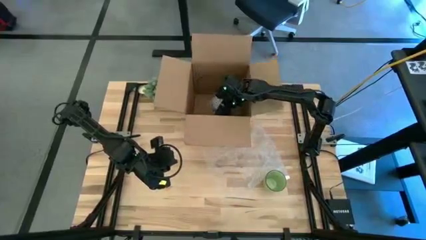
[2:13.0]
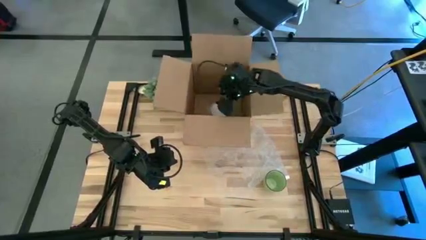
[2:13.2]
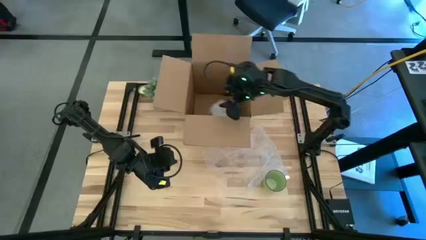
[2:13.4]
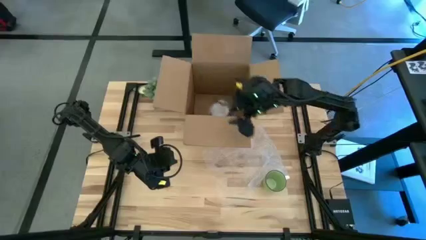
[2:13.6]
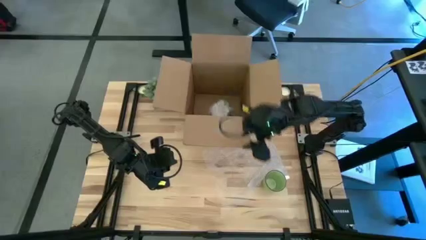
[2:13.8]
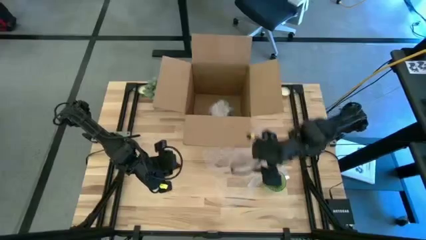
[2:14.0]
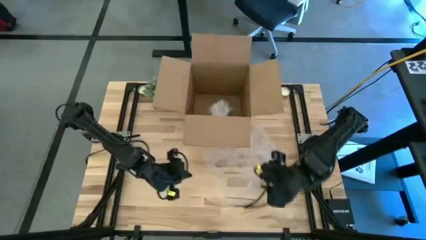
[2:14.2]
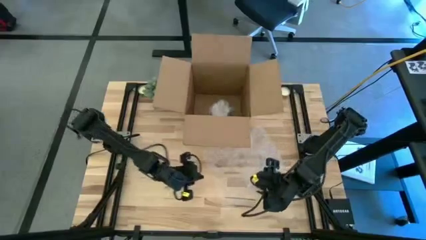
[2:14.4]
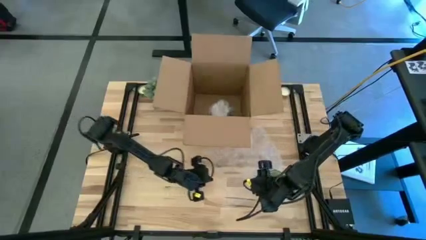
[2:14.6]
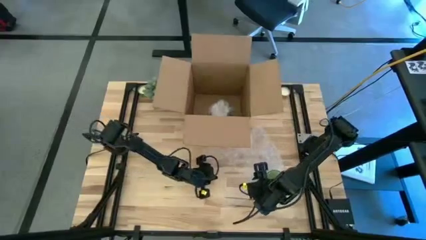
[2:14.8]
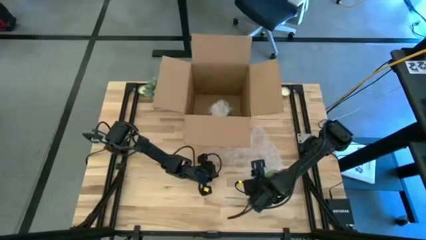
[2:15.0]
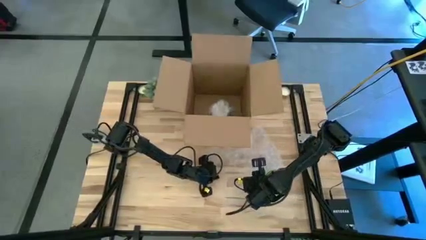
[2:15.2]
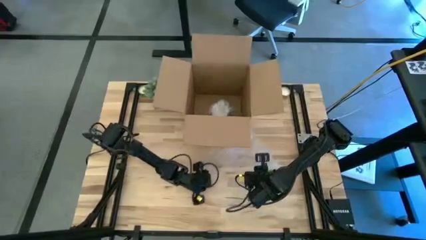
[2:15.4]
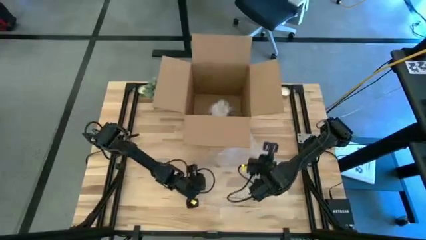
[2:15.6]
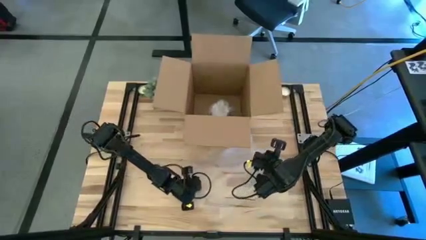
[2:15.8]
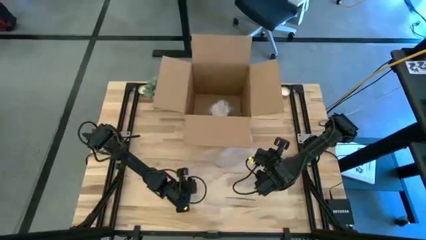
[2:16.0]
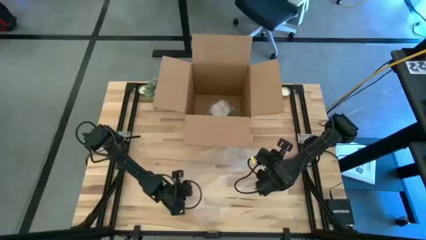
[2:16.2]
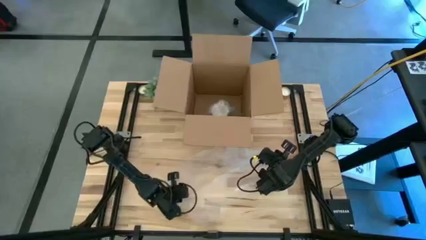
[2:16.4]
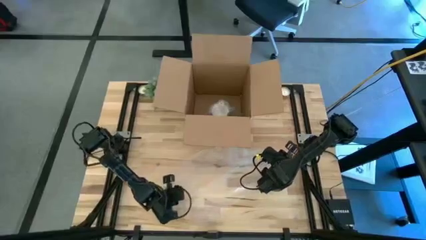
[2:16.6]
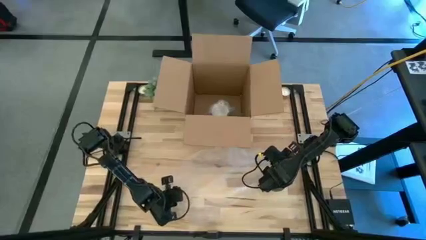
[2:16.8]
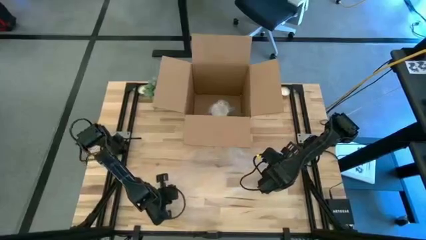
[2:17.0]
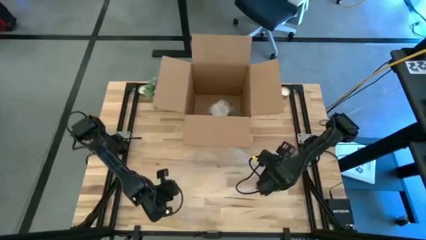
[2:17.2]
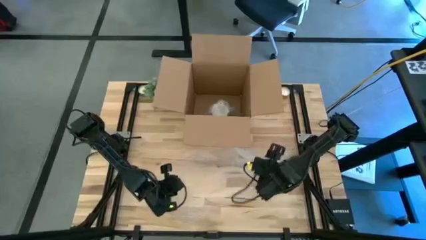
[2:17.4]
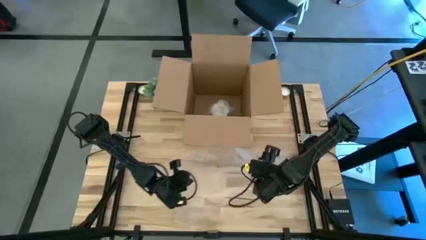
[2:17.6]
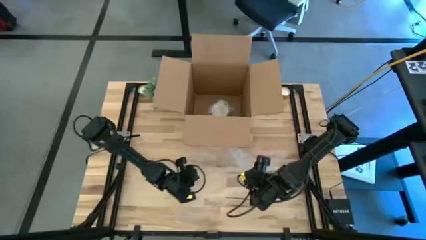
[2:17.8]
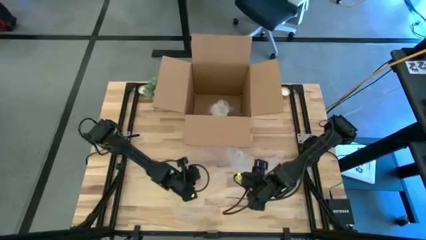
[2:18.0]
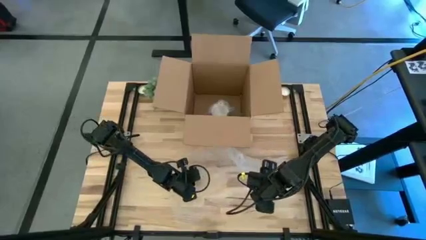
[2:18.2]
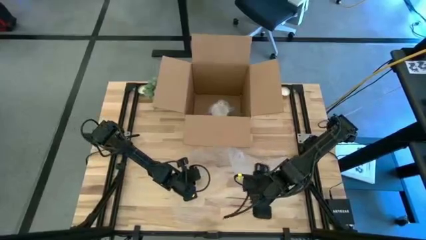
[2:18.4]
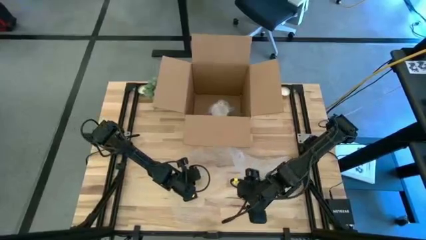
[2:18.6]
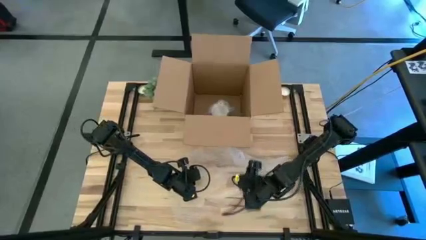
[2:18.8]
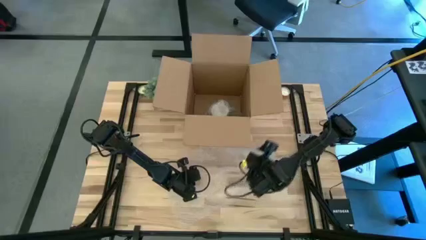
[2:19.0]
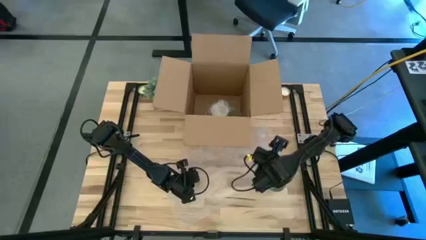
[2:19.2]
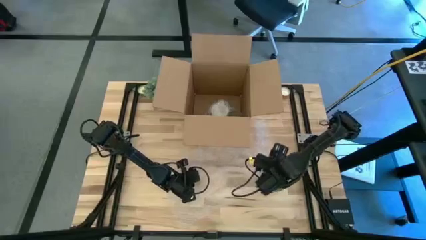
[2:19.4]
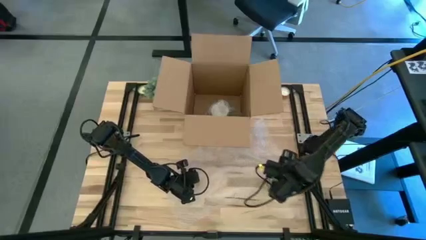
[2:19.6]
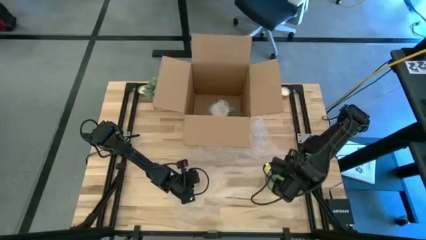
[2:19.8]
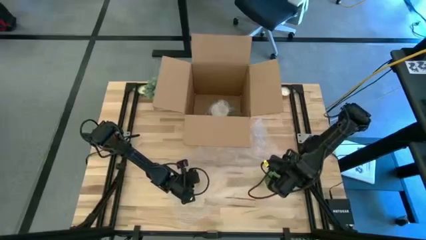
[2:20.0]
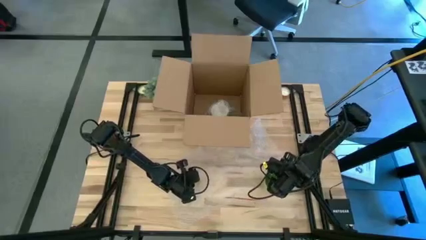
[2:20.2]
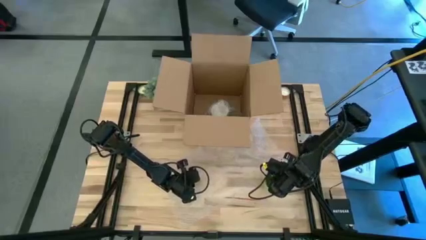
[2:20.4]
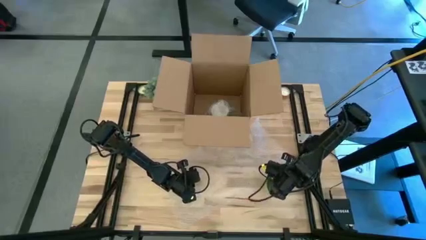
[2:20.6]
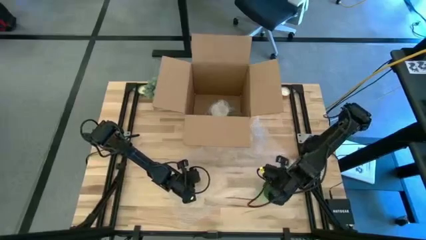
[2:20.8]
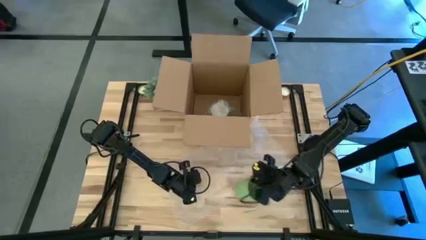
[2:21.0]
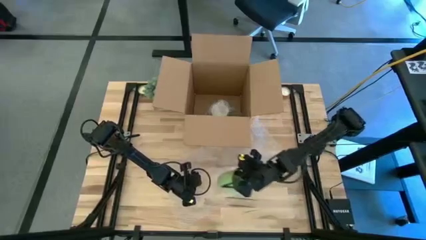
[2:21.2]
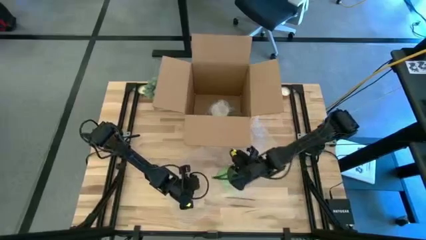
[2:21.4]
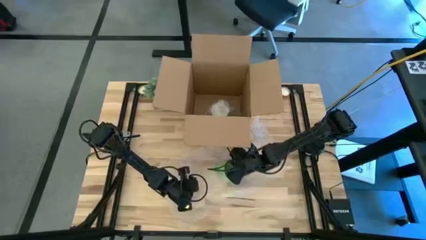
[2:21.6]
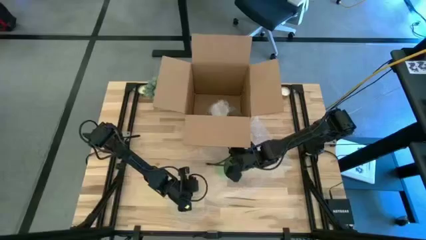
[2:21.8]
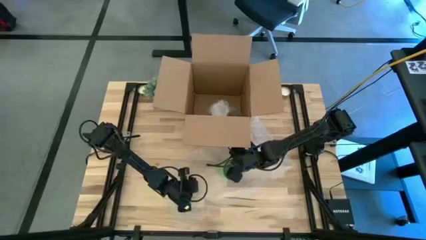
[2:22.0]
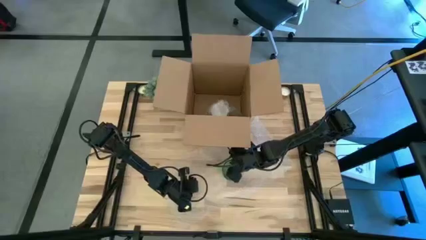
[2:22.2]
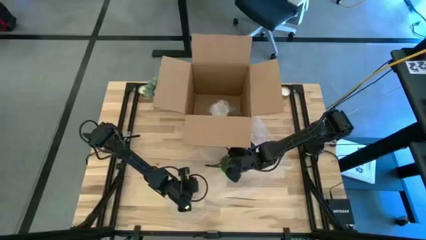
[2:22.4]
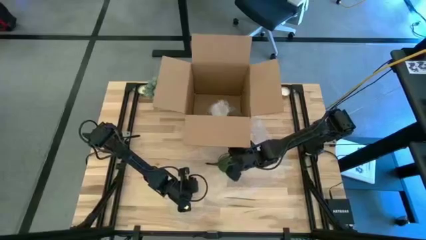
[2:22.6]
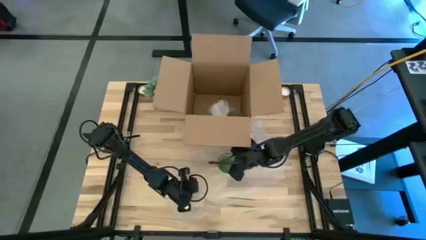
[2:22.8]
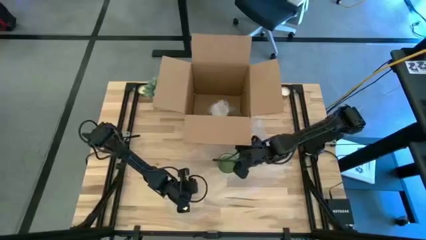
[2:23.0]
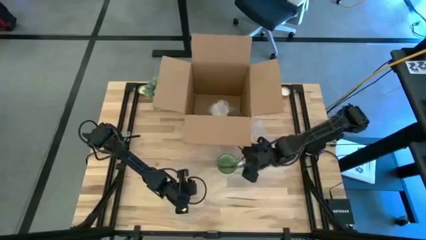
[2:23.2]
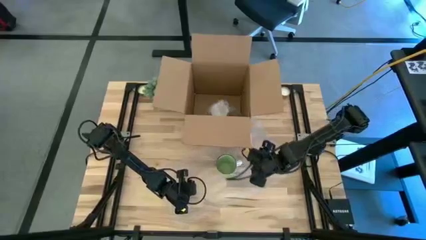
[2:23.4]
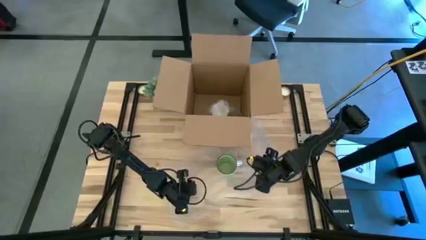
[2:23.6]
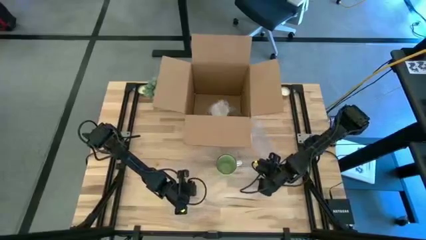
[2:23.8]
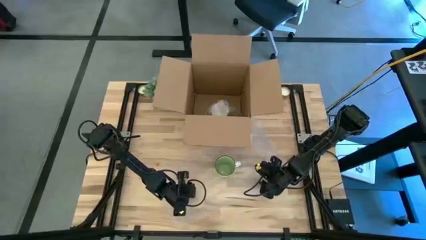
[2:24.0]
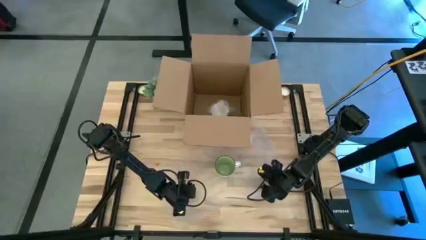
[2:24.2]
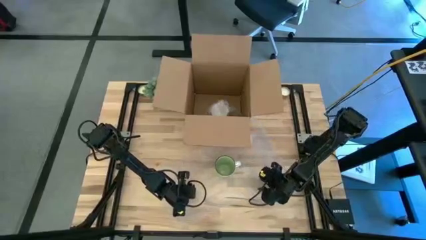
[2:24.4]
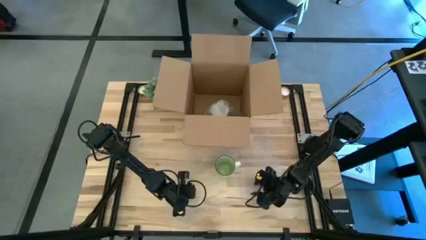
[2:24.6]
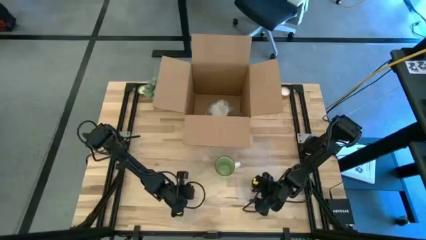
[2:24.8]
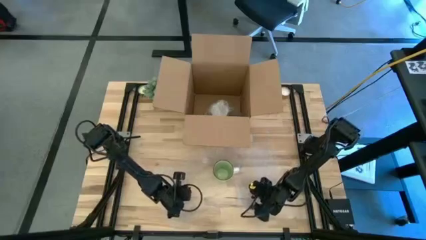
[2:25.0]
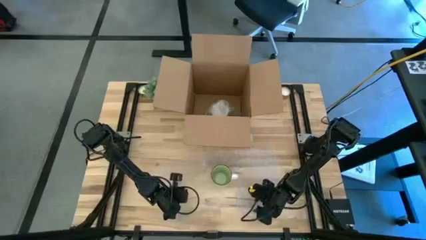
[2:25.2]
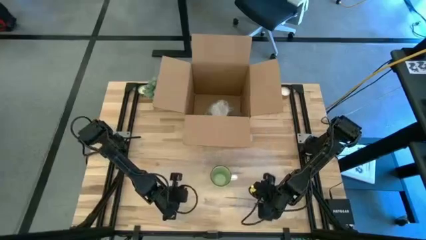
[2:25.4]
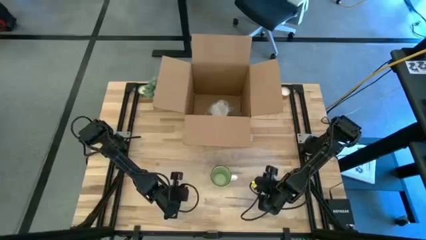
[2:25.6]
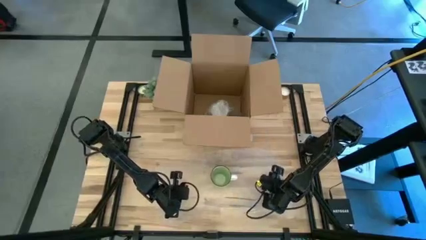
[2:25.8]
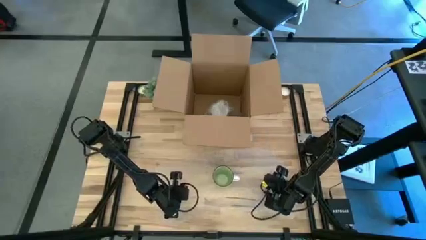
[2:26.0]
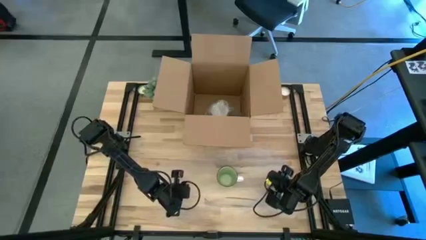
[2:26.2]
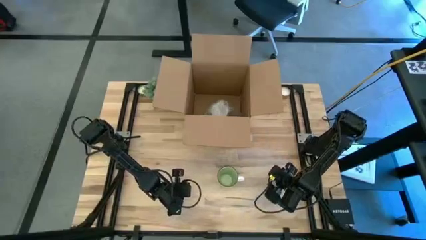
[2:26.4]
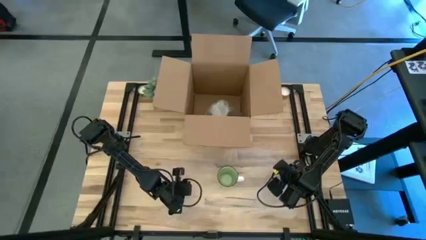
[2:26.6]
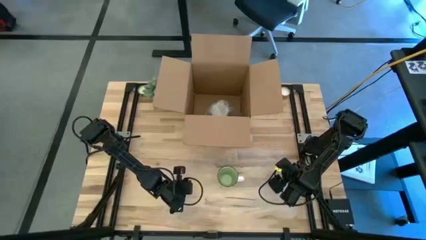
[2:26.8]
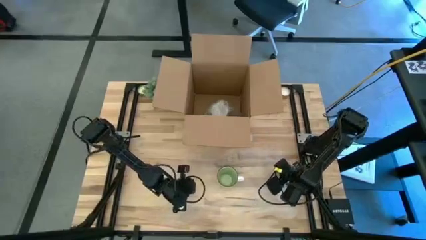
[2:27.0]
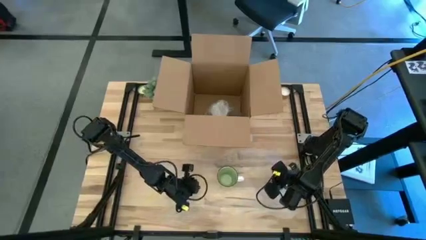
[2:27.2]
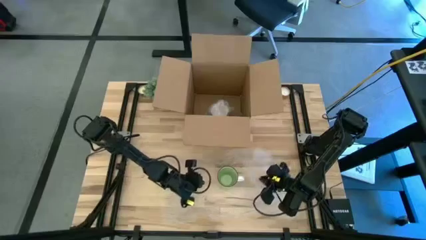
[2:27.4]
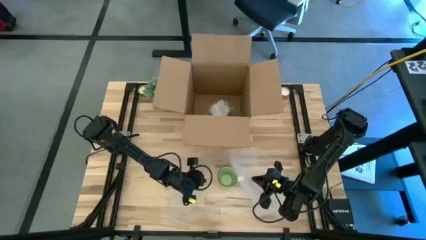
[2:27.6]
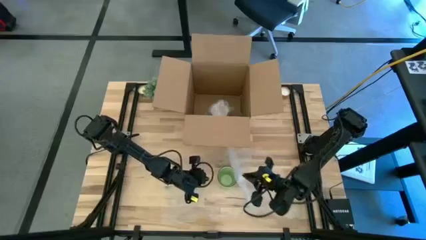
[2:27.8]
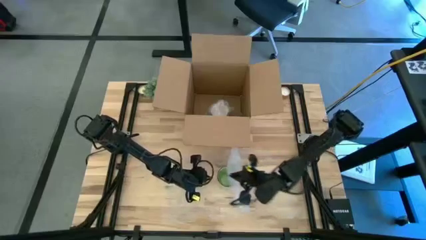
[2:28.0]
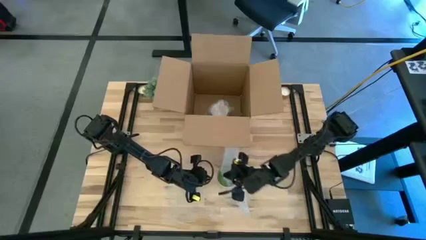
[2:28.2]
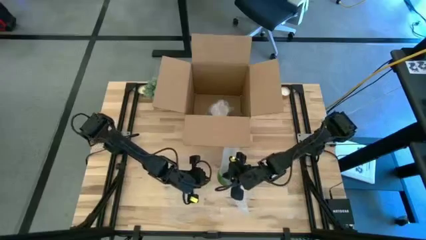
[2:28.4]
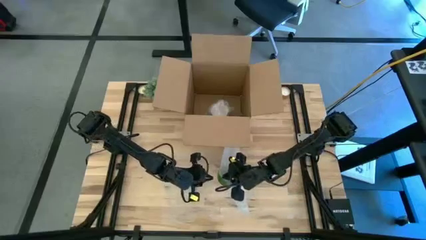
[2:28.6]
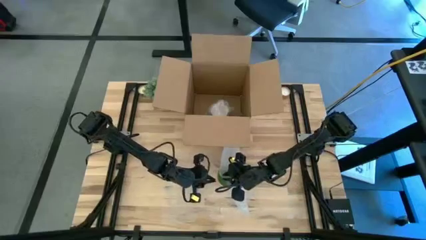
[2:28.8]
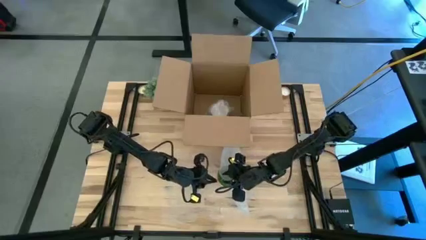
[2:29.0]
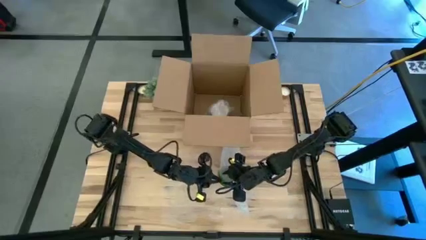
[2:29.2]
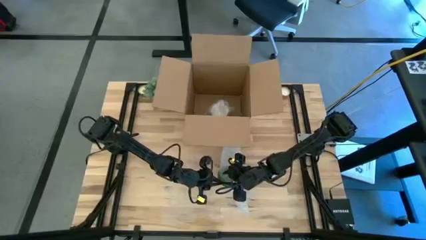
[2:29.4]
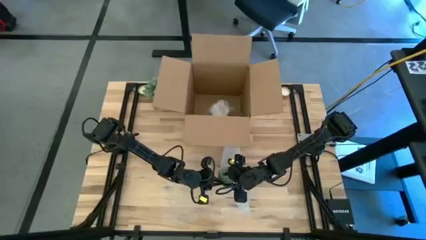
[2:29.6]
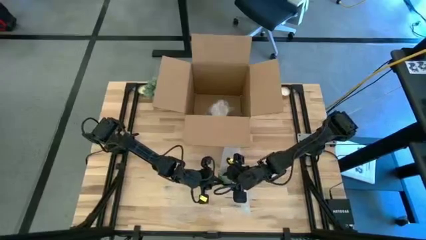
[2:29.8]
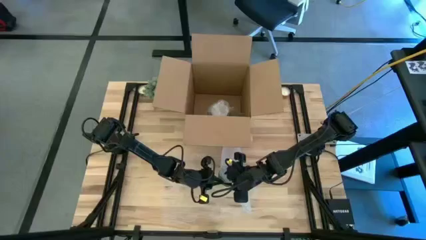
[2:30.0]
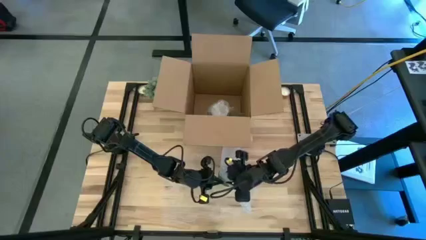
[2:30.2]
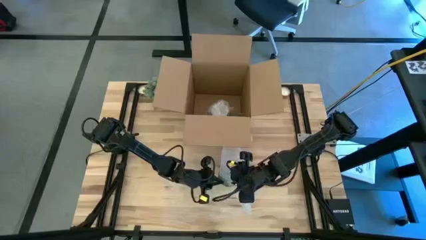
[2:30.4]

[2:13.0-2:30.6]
Task: wrap mug
Wrap the green mug with bubble wrap
